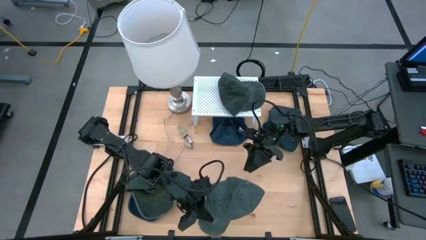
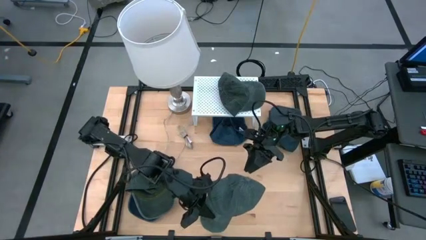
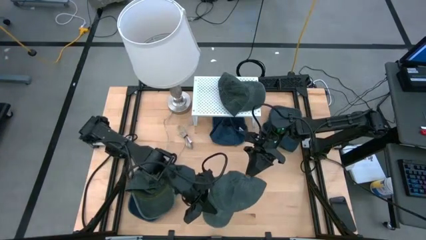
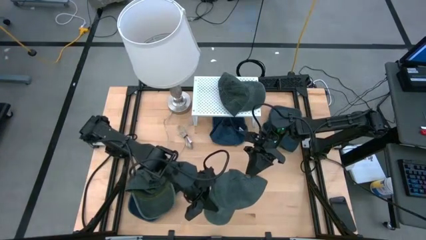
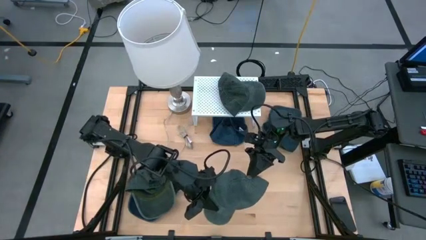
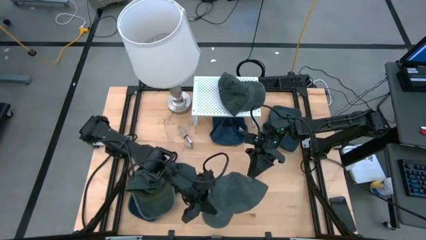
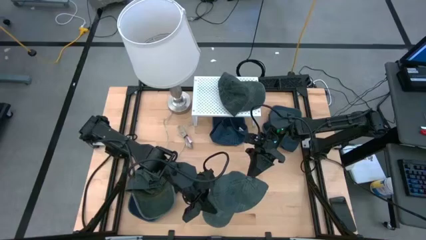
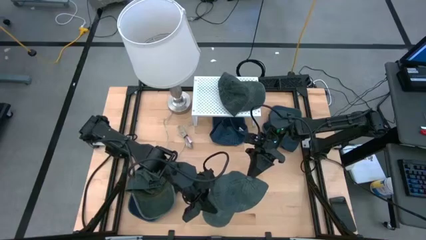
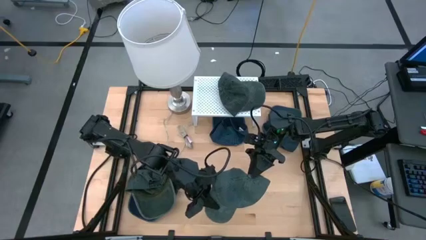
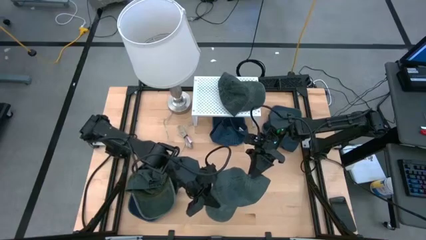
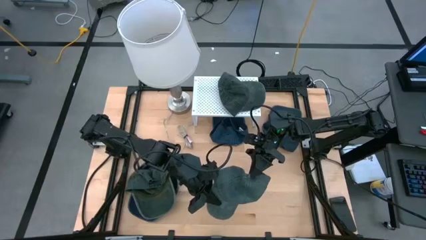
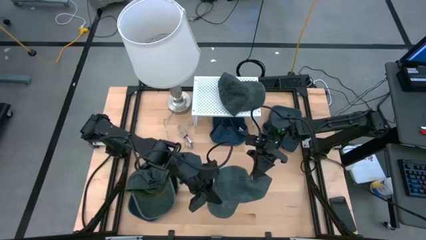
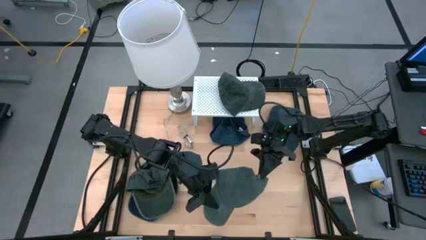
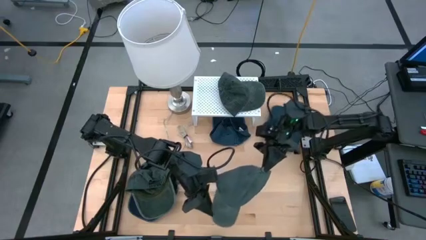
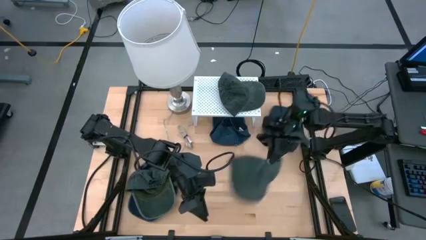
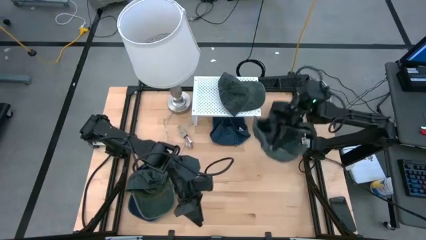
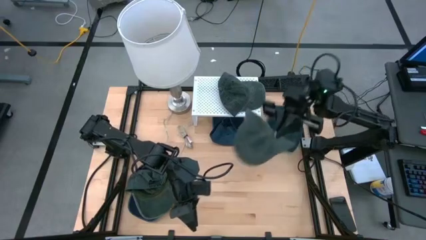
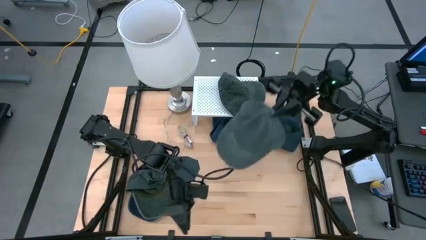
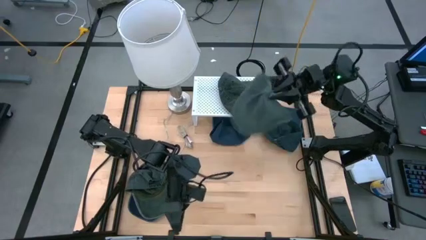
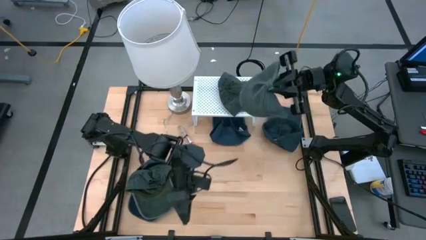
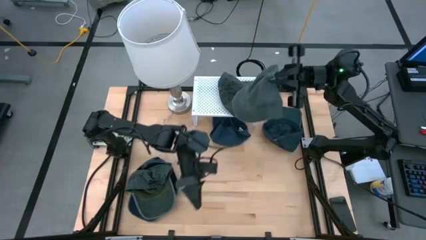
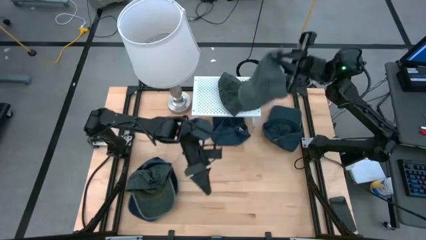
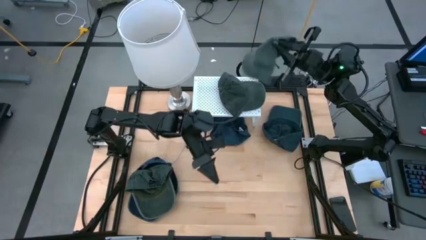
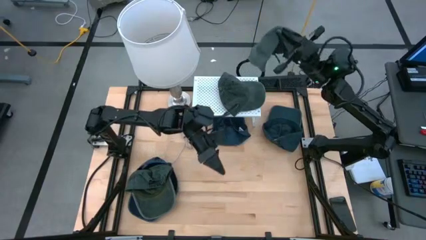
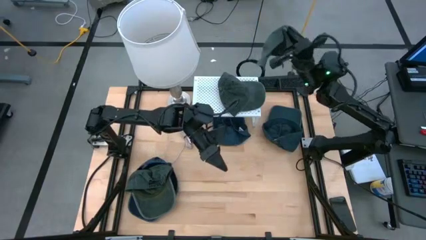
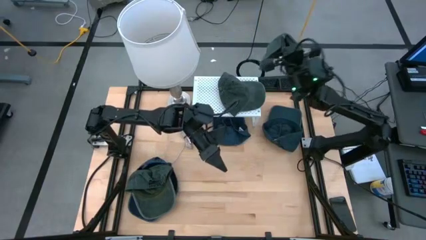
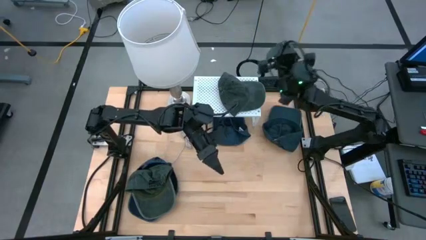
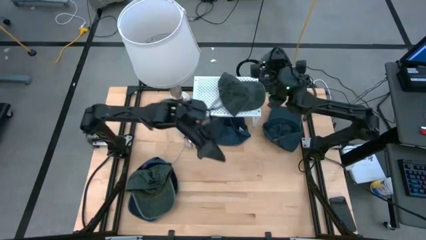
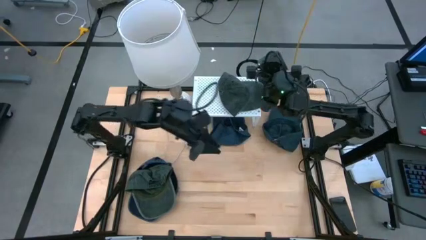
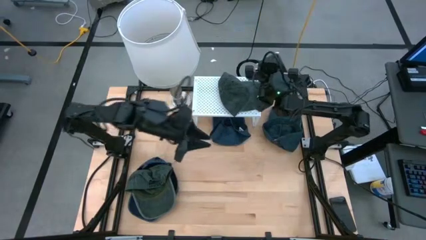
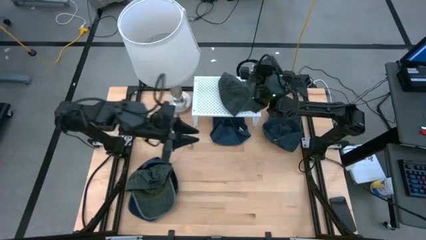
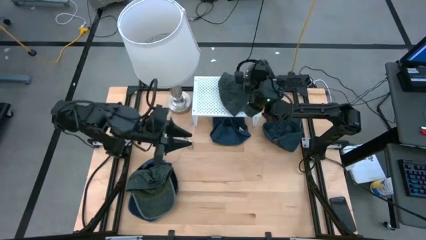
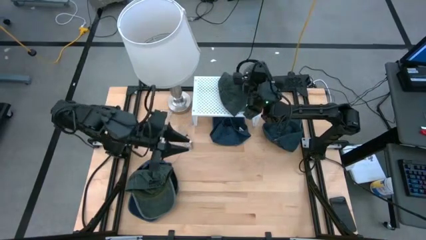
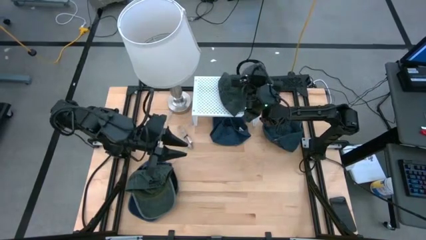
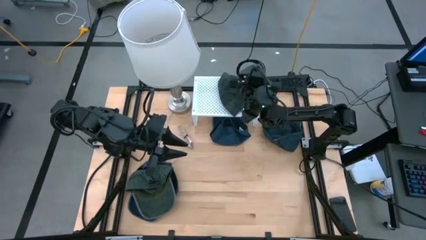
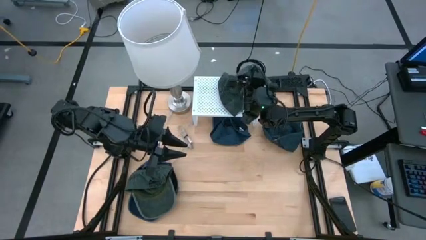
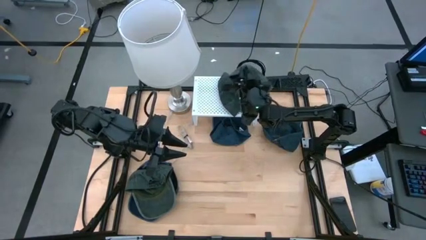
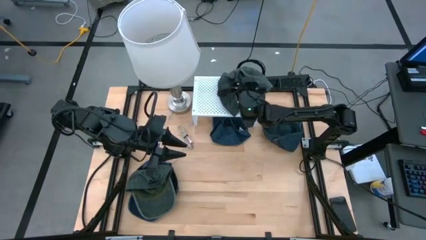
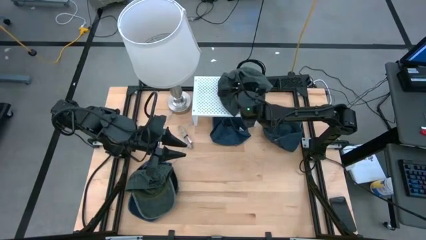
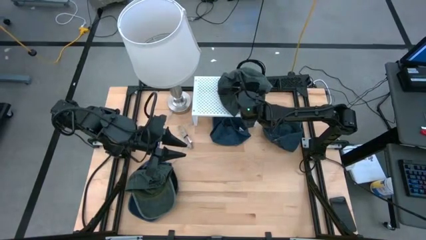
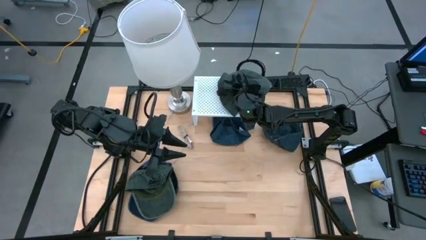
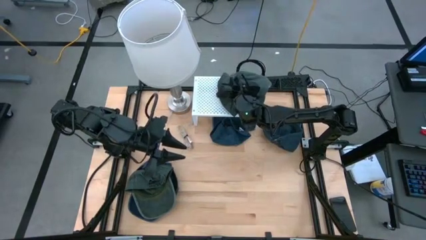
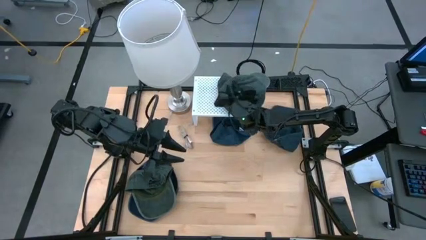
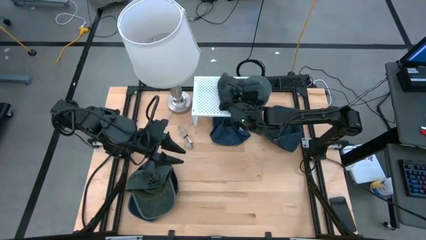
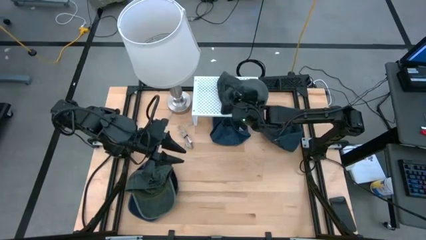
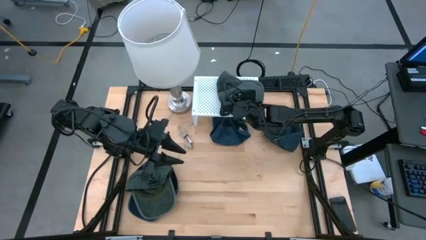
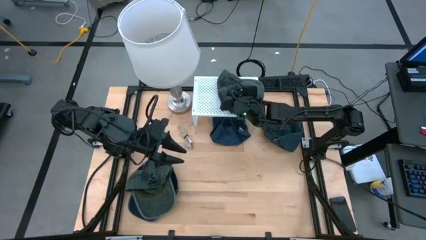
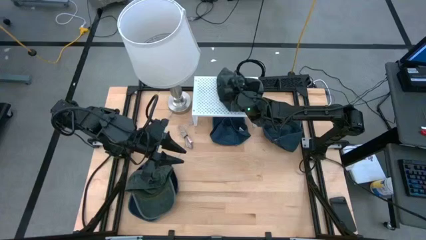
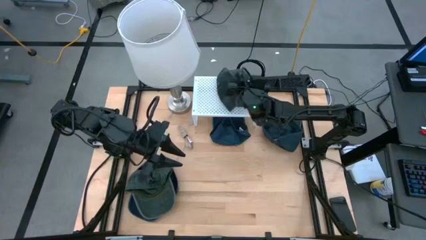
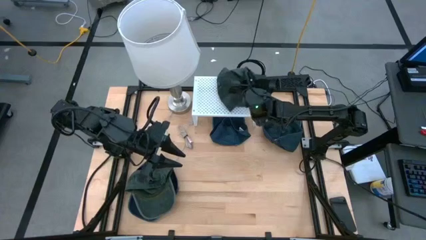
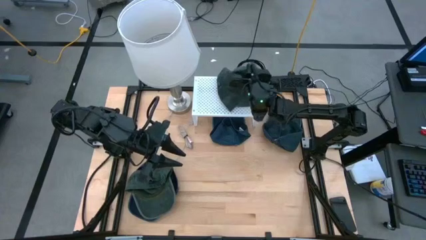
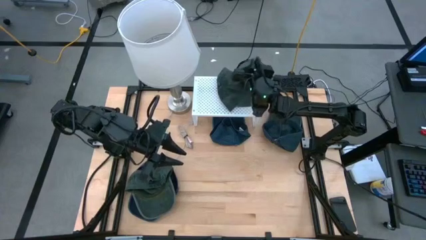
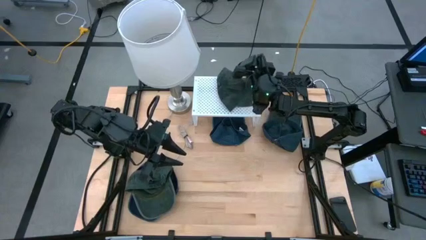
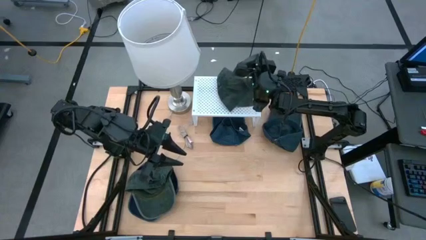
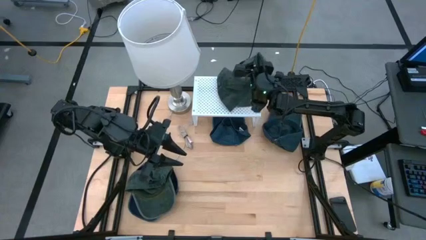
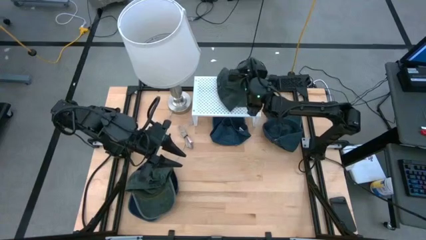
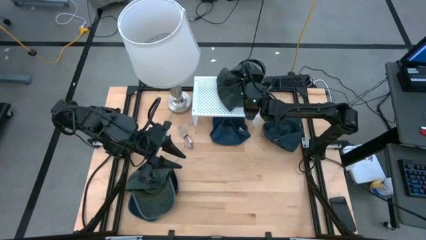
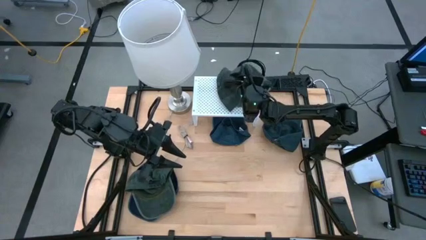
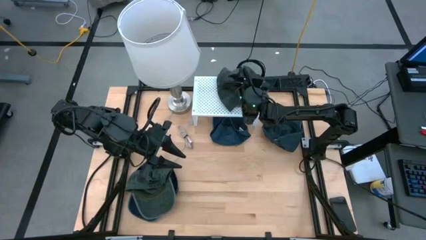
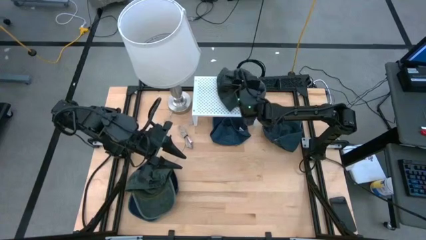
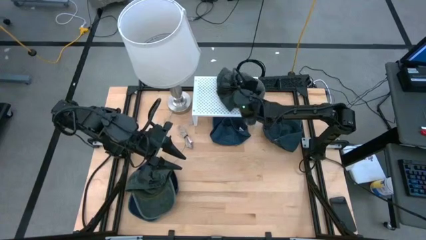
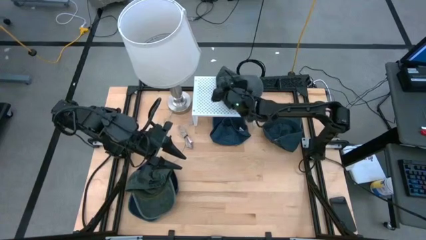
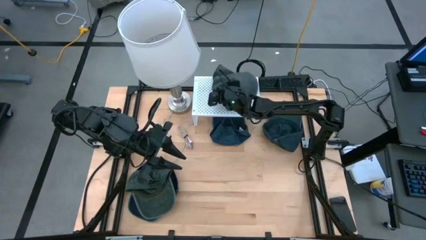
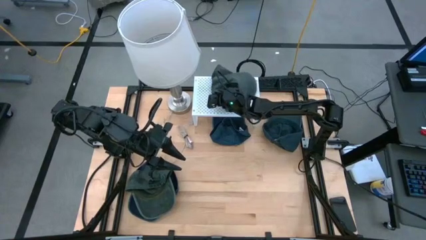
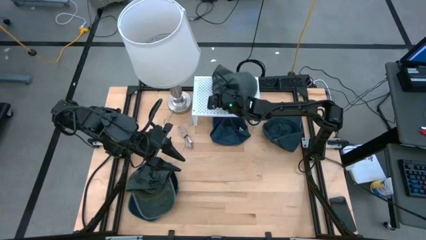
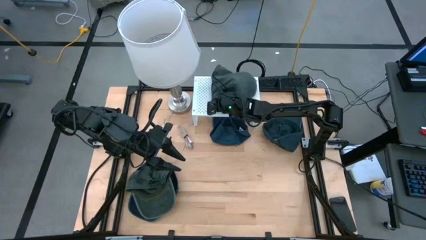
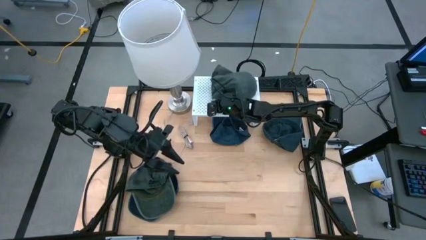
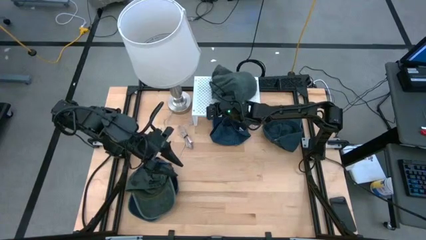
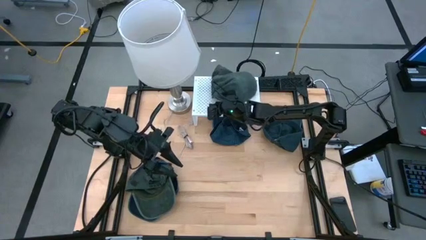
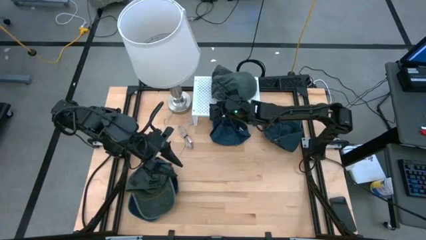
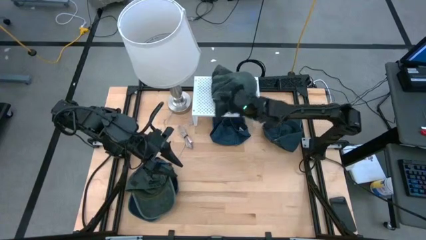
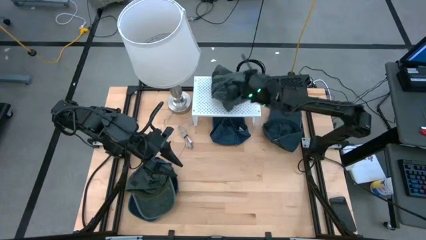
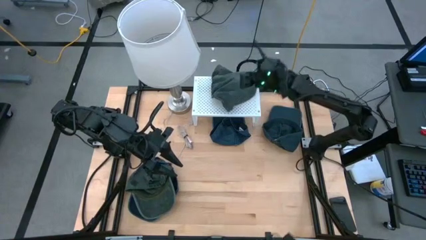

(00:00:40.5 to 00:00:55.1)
Task: Pick & Place hat
Stack the top gray cap on the gray cap on the shelf
